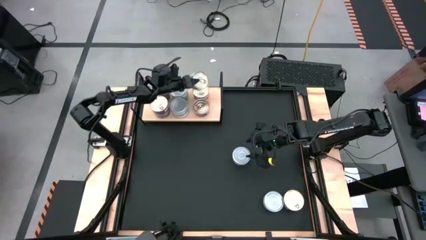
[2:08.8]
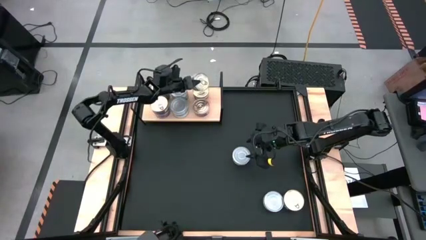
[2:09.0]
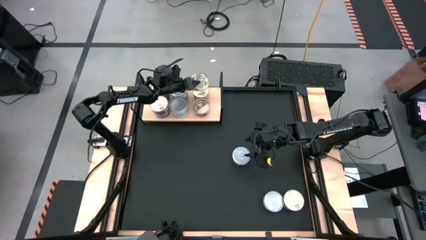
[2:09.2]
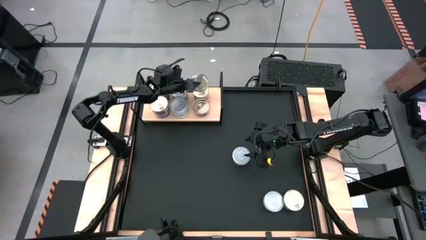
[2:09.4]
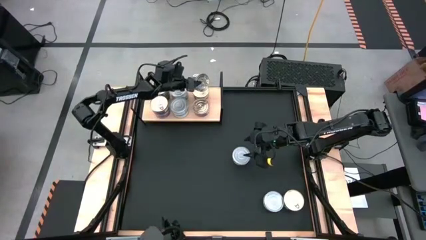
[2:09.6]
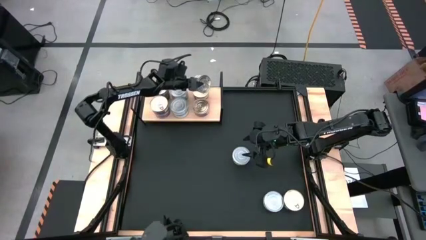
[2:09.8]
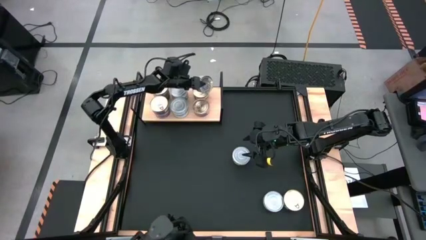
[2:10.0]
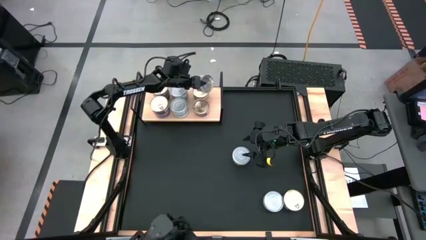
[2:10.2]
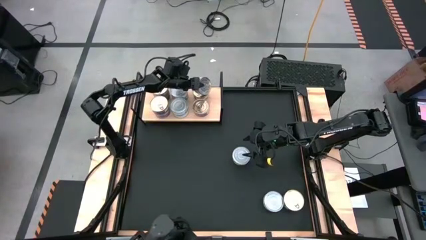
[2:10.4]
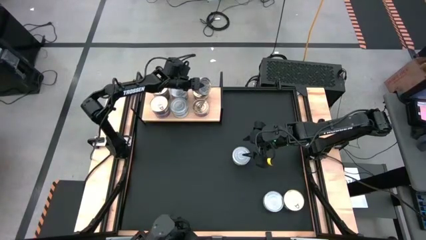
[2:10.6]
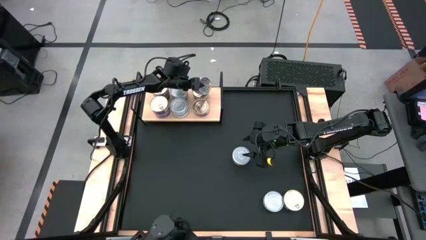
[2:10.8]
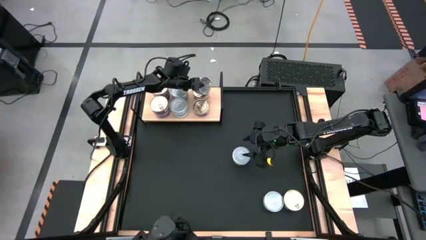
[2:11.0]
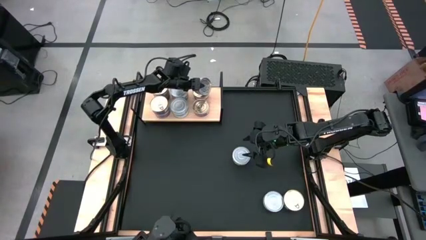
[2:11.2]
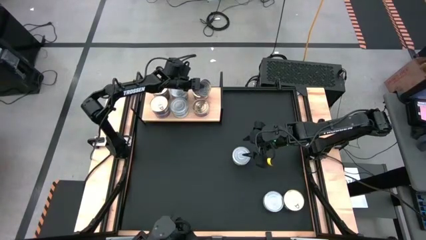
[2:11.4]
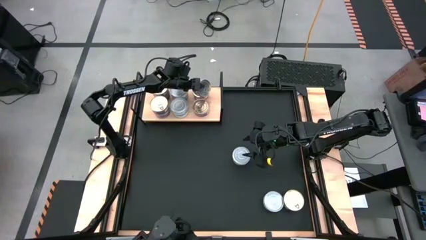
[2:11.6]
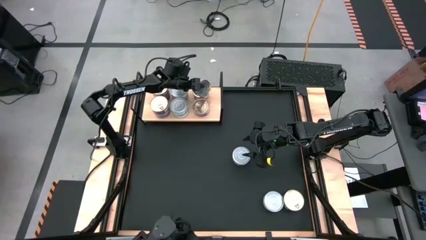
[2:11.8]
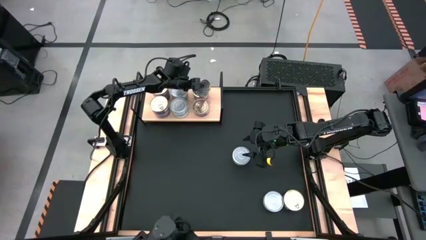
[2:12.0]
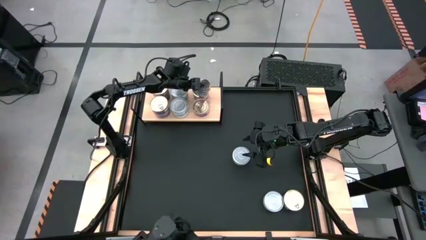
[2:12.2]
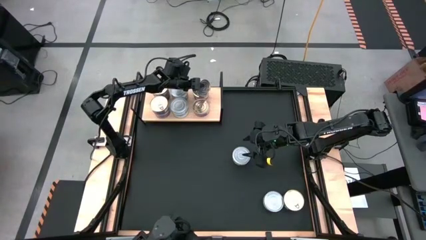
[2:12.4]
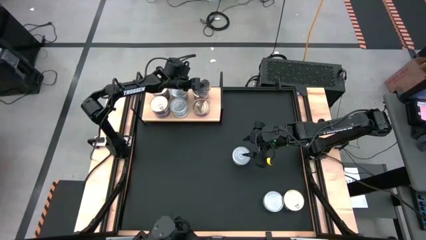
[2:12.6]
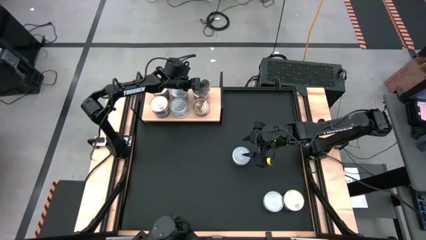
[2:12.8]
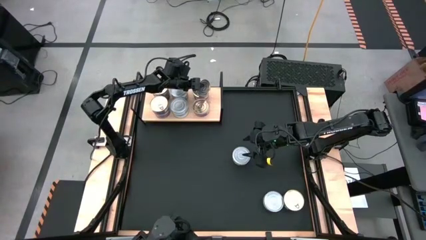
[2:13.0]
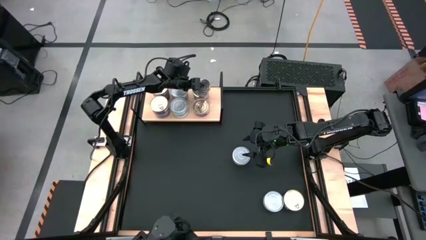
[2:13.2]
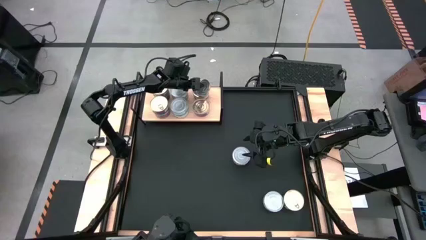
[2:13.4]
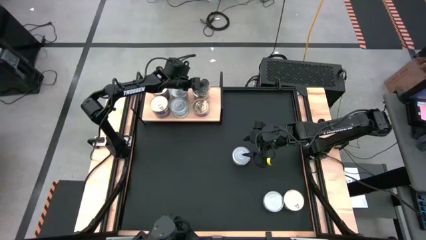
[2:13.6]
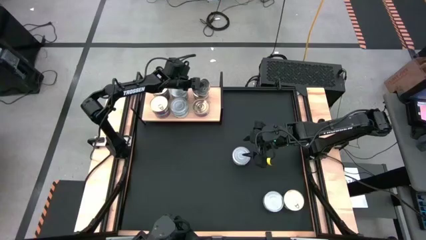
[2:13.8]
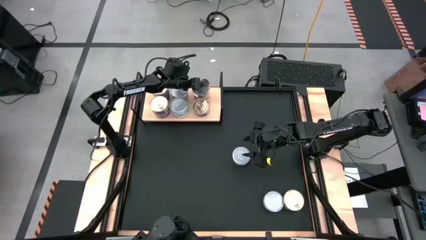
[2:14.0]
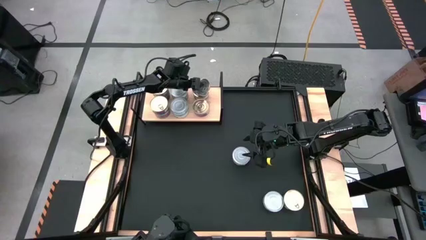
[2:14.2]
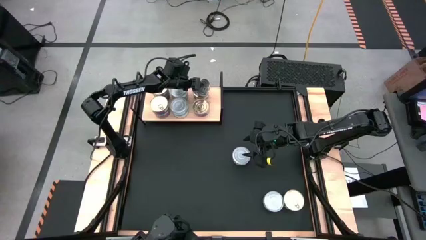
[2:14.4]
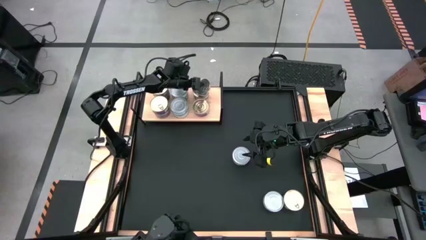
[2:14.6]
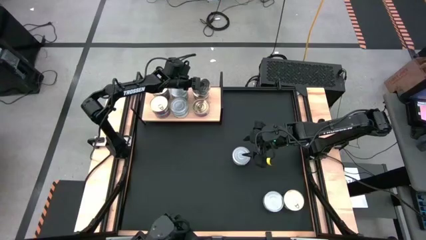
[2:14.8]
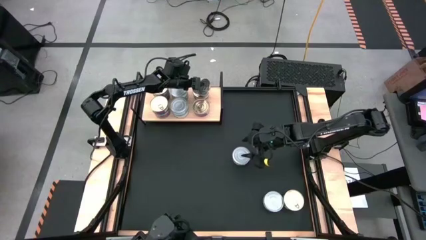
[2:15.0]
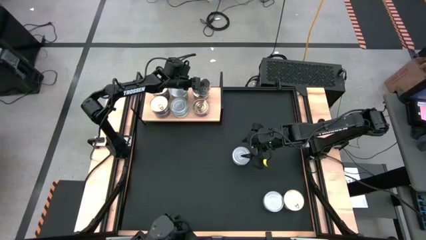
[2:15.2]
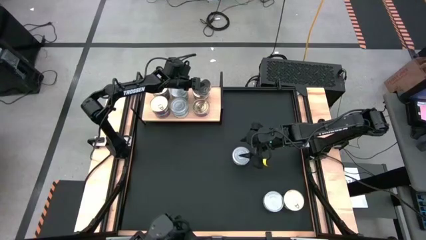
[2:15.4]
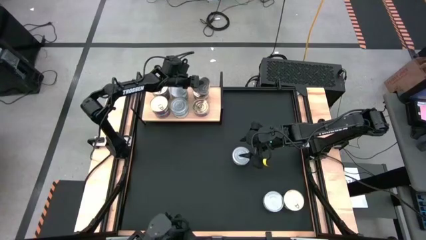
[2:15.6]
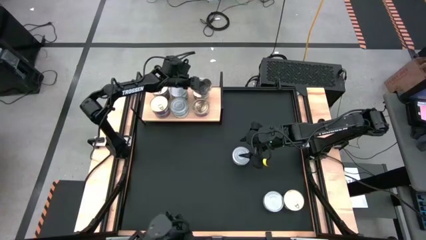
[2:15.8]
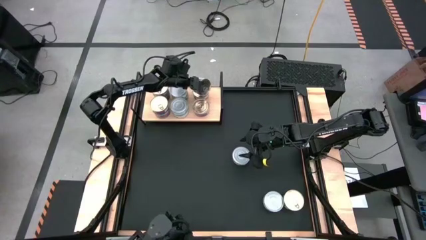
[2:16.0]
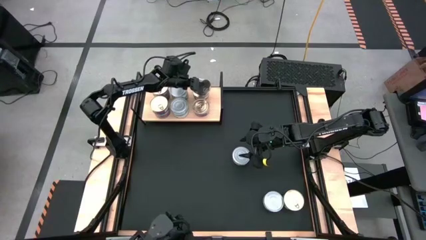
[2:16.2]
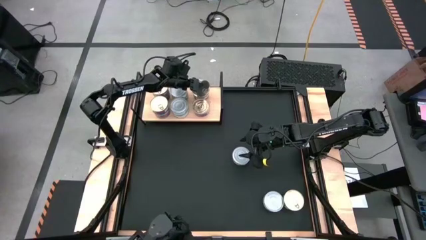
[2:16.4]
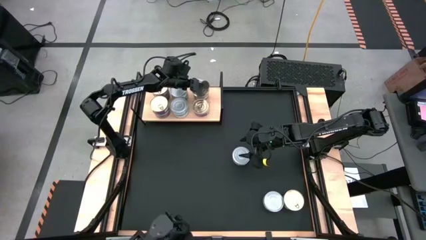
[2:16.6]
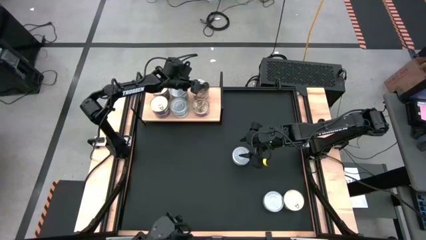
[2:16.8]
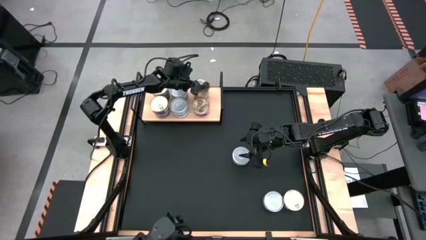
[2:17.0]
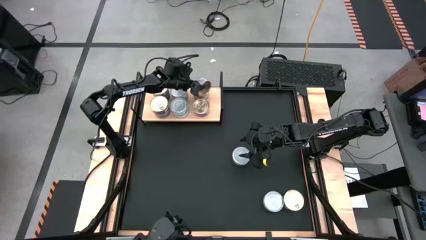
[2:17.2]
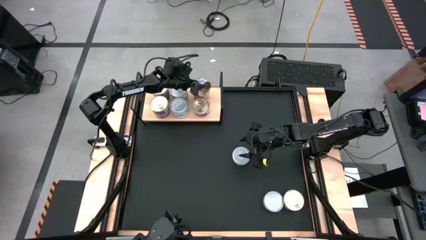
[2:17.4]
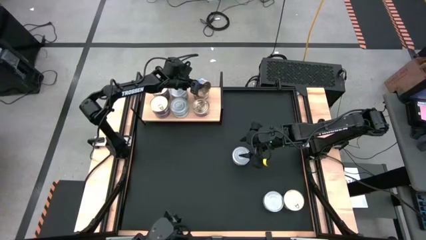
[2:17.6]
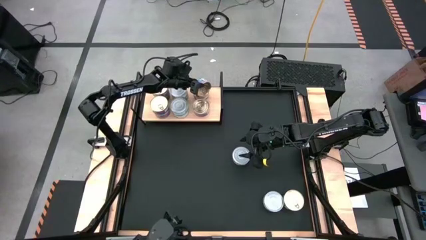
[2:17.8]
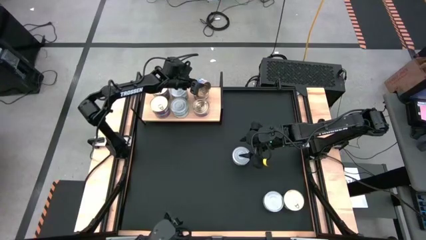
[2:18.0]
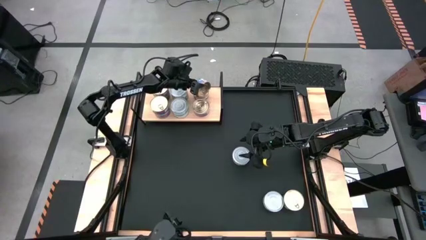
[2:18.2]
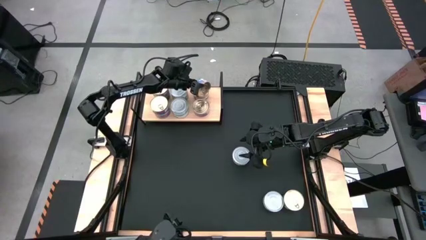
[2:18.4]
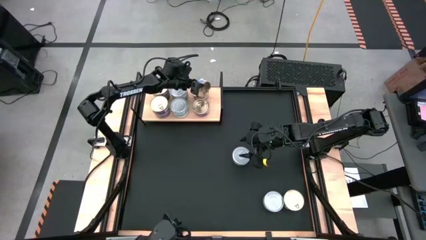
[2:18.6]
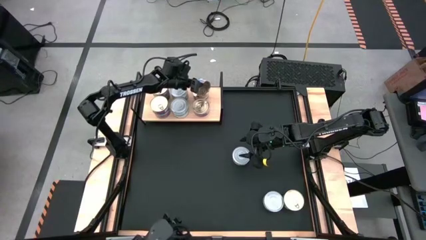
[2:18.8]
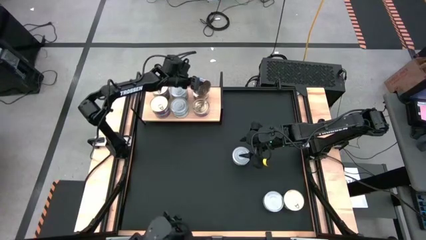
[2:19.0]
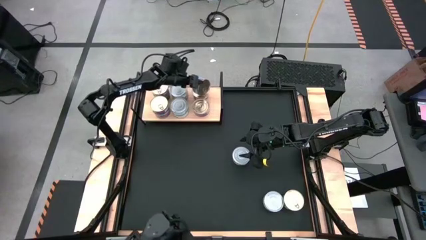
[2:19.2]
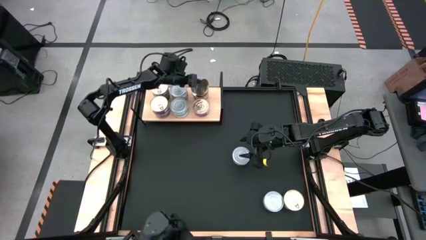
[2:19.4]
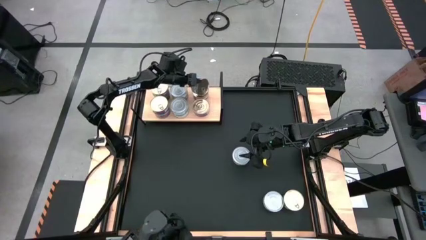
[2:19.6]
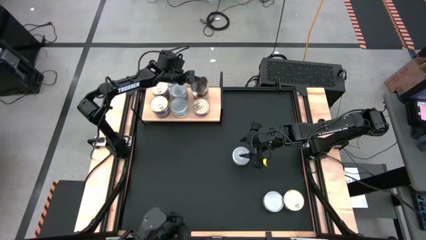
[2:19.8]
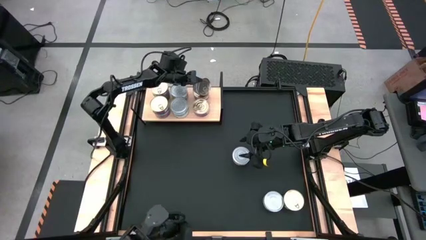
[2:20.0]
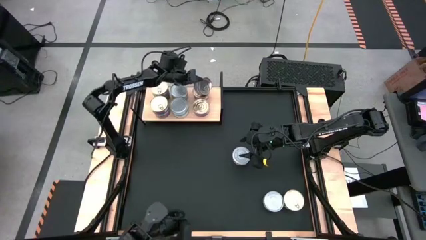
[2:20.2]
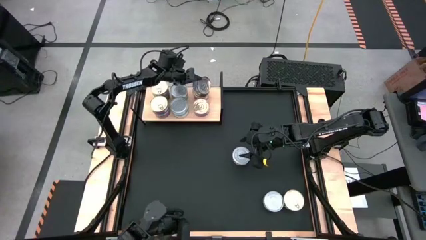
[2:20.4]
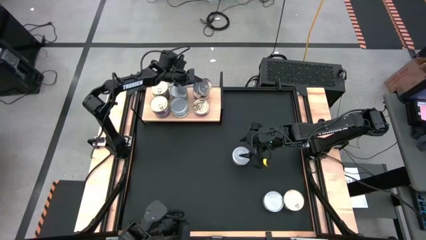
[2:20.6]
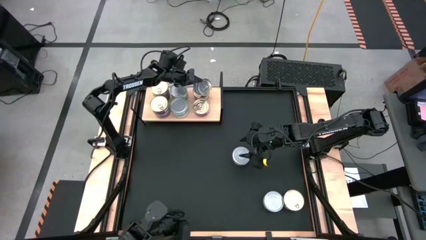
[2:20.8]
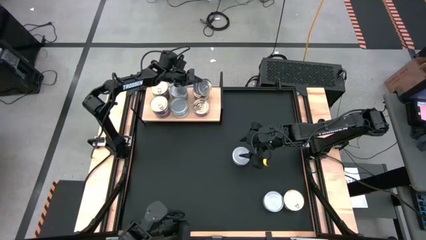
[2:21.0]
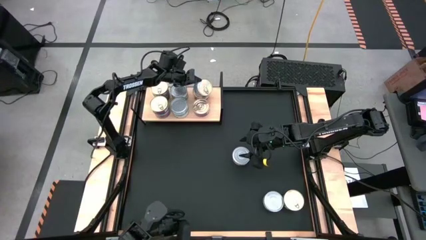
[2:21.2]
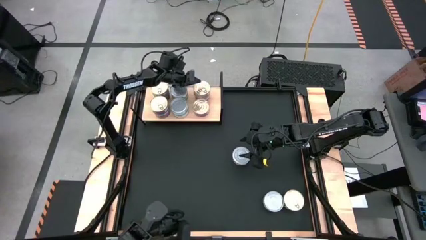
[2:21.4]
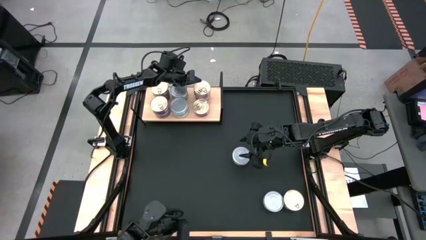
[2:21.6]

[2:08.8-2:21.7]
Task: Stack canned seafood by type on shelf
Stack the blue tuna can on top of the blue tuna on the shelf

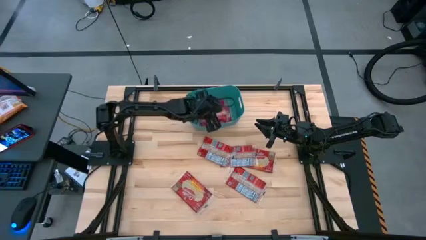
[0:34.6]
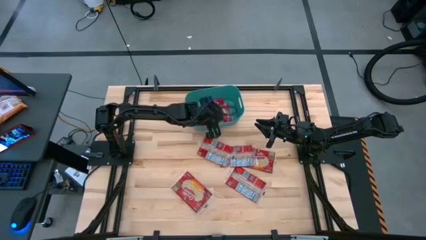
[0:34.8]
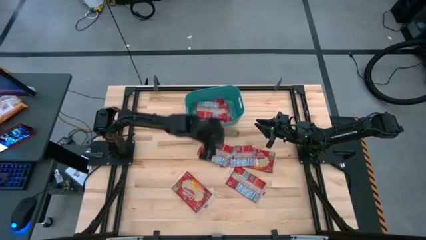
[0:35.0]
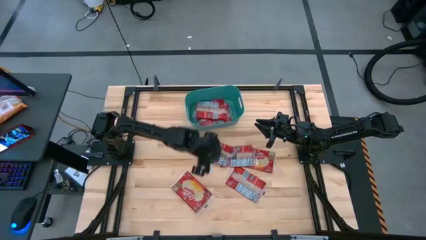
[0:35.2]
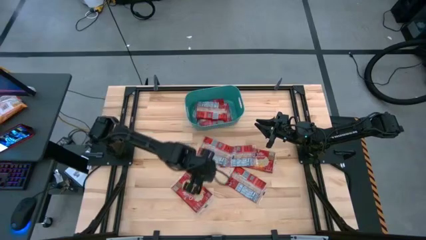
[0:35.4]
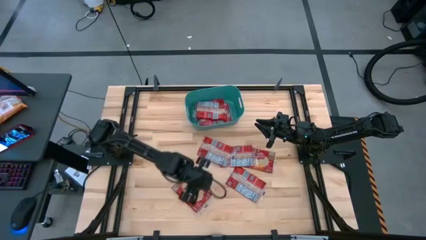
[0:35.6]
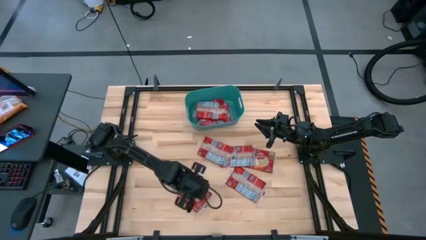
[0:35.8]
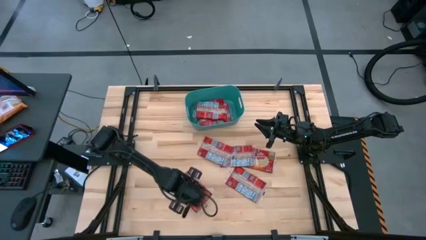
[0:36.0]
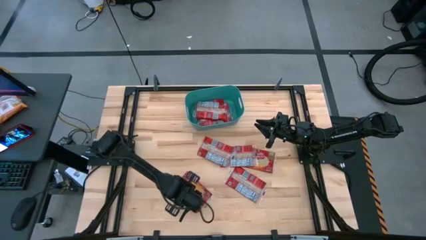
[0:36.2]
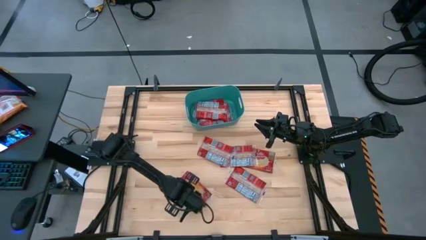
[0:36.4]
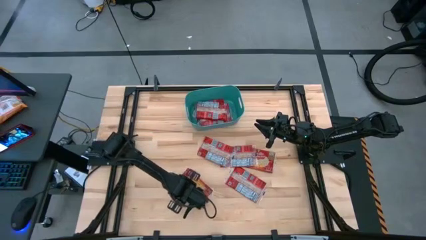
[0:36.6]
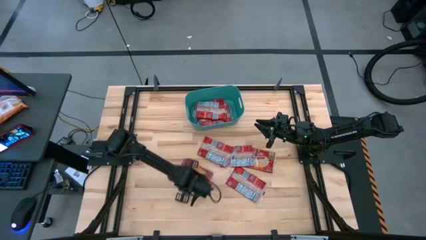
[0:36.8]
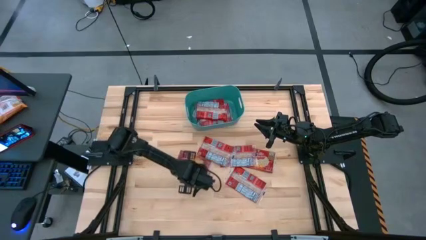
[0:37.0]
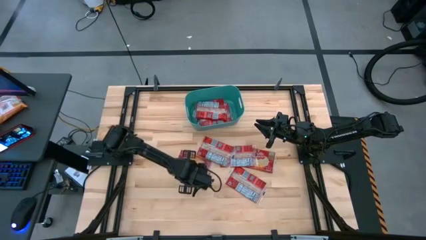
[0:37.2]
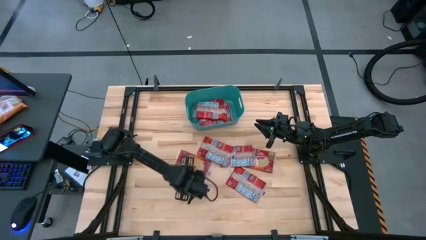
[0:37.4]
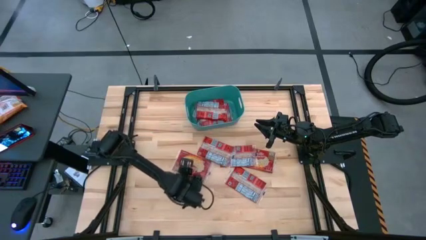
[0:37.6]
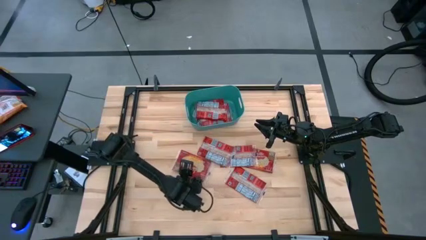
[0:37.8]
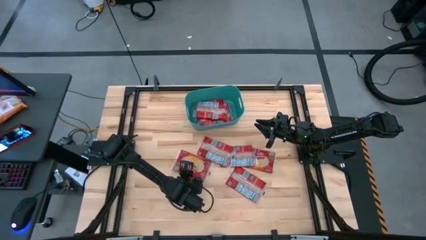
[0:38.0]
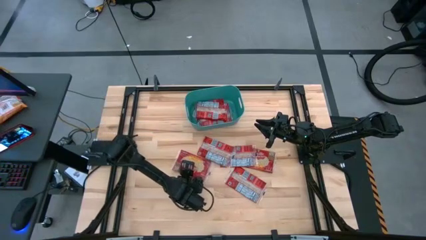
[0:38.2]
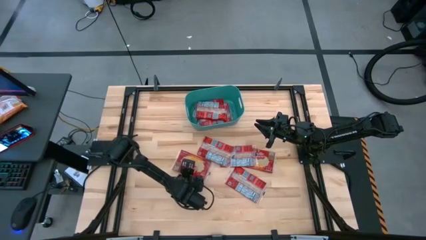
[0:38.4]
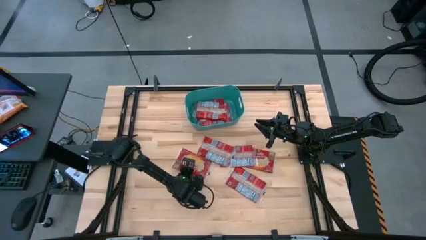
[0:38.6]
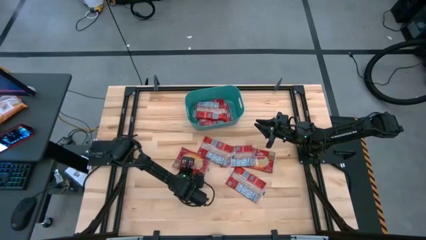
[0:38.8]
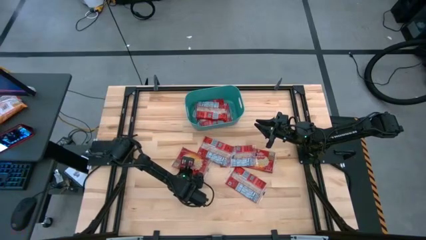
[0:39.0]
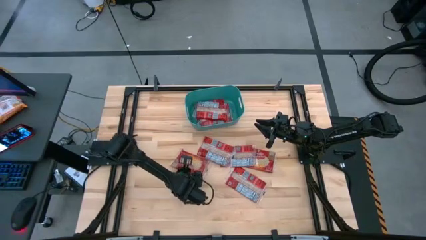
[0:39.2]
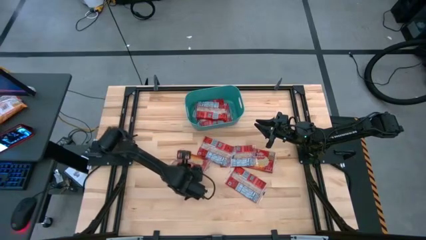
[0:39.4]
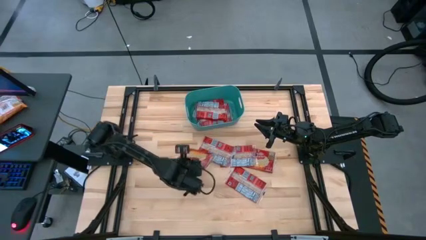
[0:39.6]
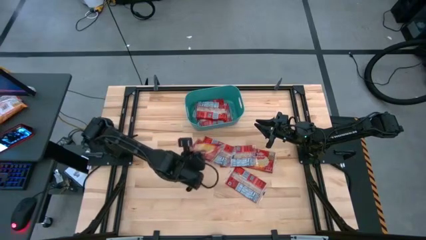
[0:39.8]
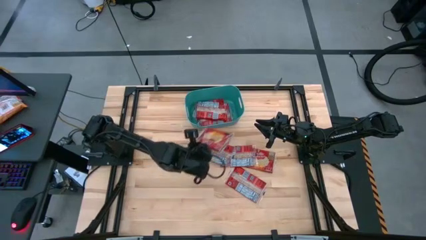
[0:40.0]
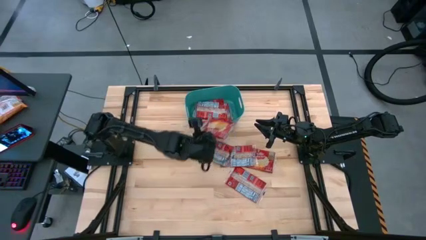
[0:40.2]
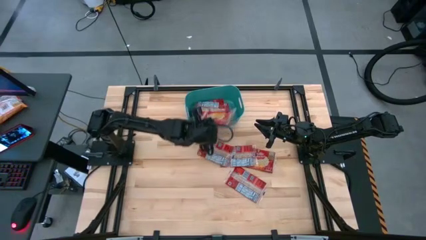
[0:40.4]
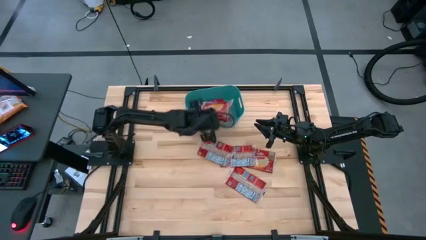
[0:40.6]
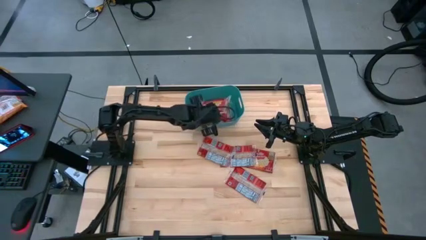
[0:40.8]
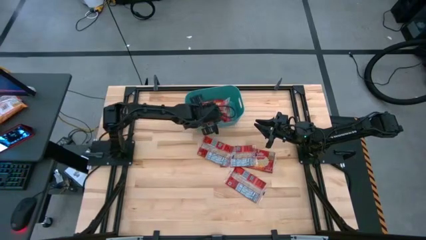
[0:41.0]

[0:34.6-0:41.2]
Task: Sort popcorn bags into baskets
Put the red popcorn bag into the blue bin
